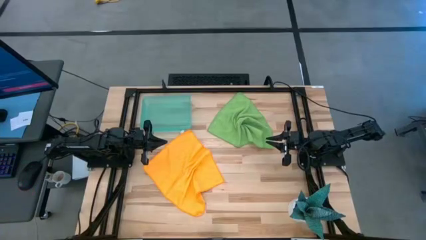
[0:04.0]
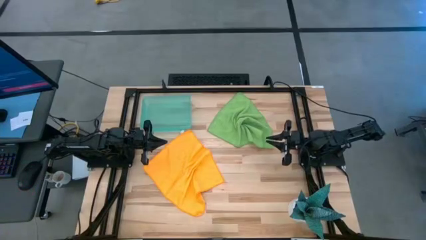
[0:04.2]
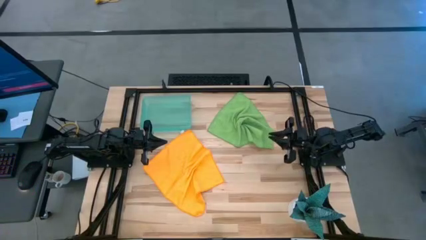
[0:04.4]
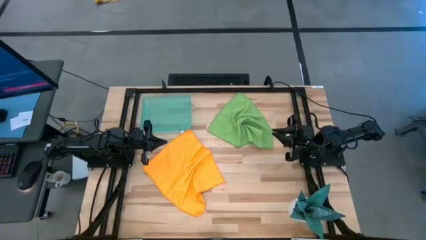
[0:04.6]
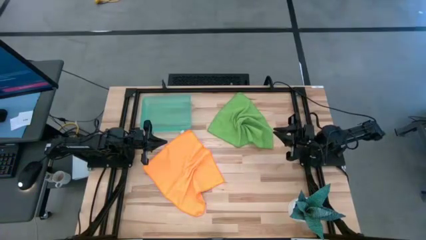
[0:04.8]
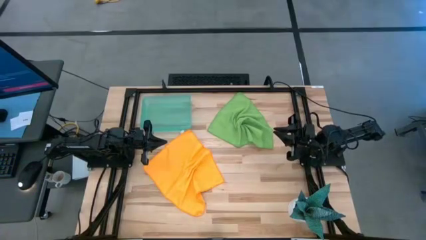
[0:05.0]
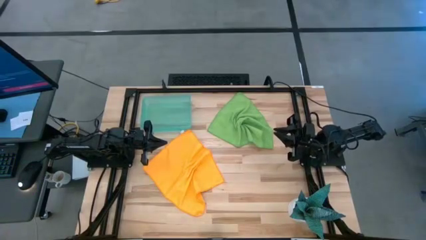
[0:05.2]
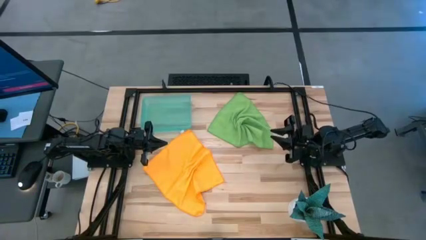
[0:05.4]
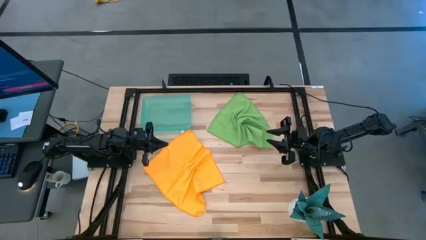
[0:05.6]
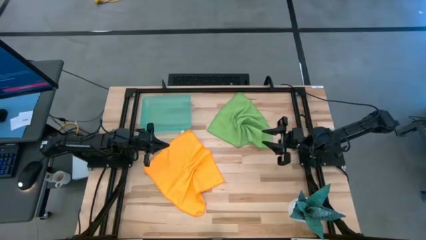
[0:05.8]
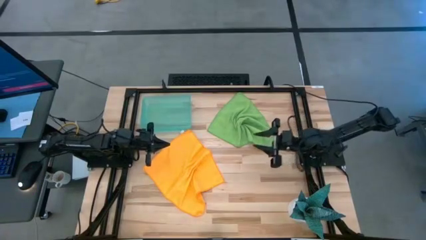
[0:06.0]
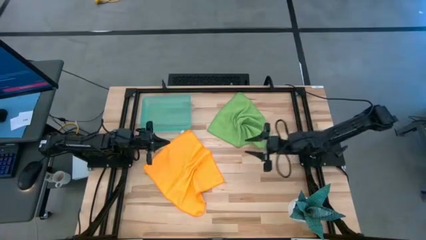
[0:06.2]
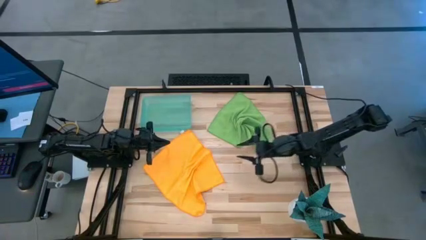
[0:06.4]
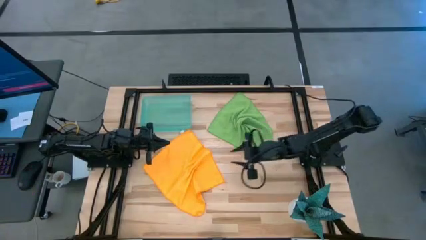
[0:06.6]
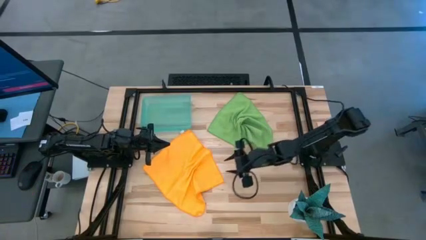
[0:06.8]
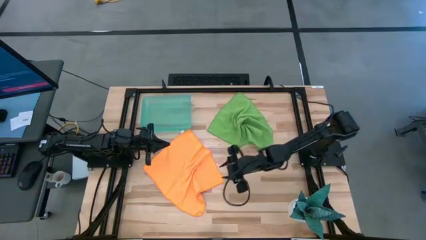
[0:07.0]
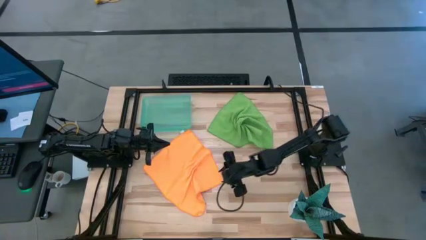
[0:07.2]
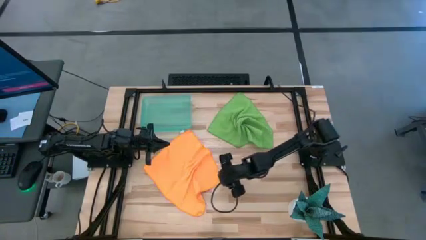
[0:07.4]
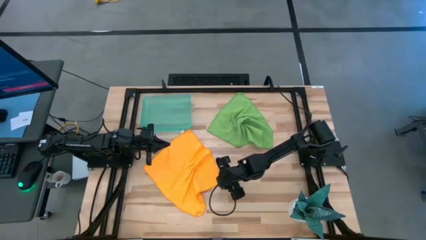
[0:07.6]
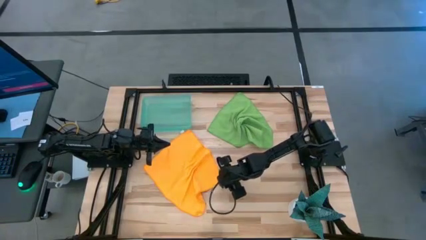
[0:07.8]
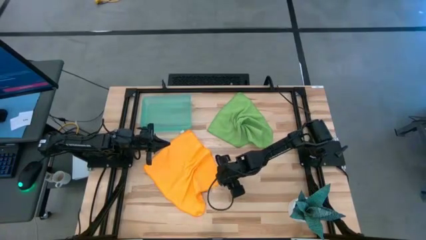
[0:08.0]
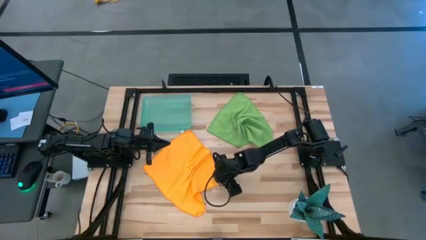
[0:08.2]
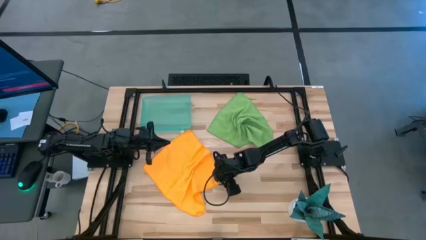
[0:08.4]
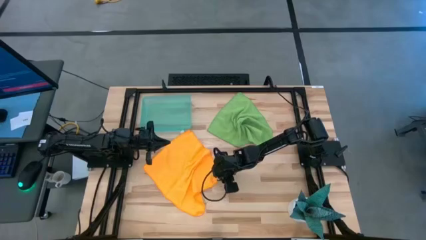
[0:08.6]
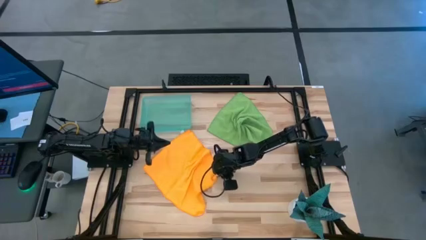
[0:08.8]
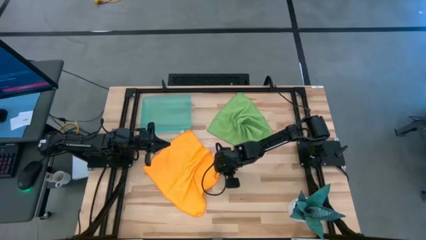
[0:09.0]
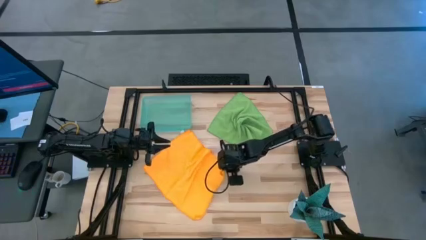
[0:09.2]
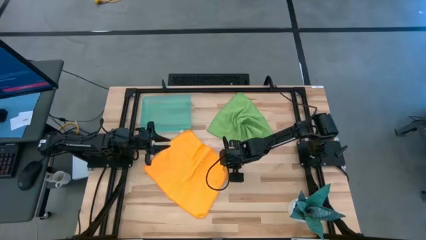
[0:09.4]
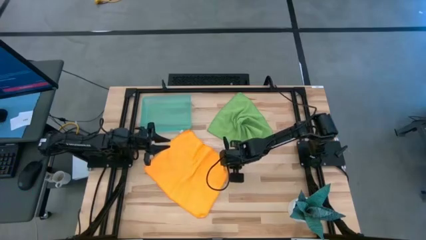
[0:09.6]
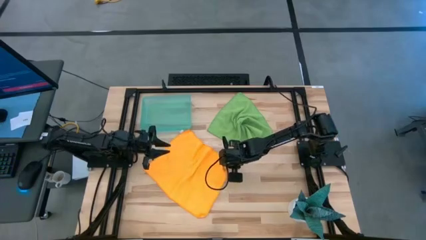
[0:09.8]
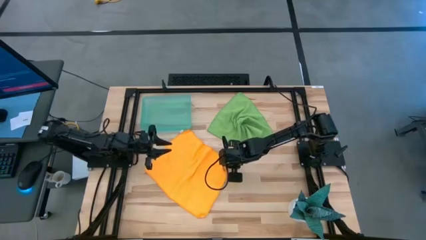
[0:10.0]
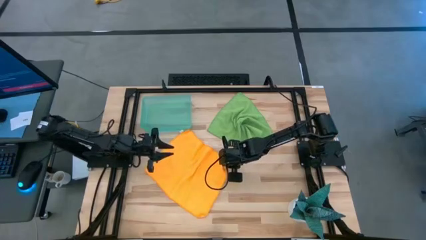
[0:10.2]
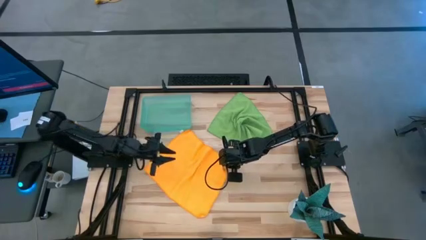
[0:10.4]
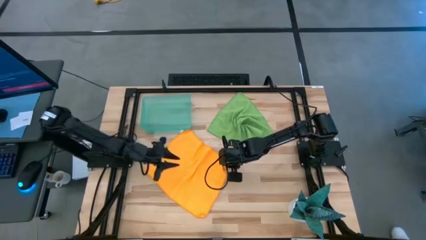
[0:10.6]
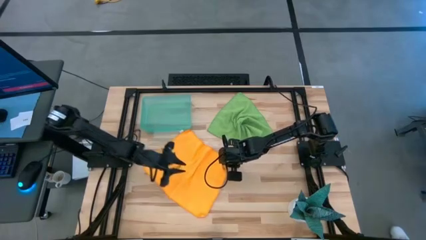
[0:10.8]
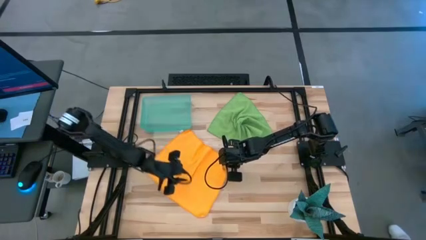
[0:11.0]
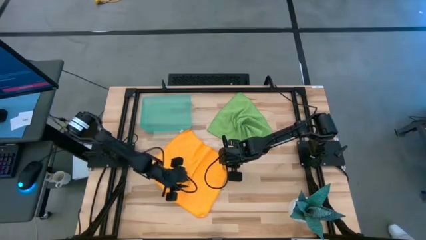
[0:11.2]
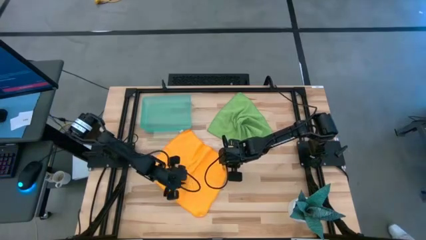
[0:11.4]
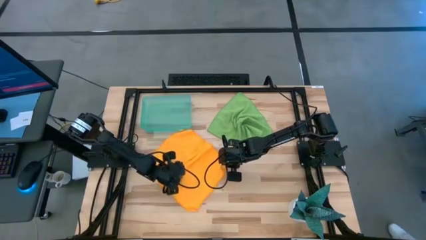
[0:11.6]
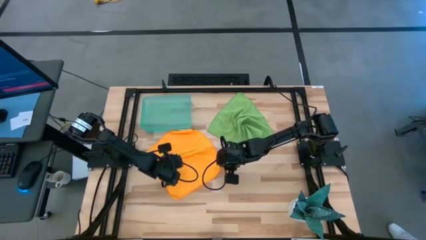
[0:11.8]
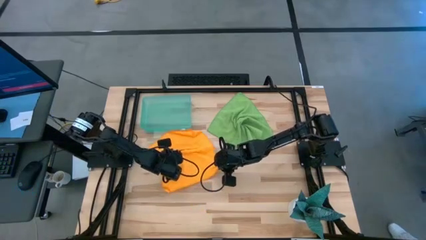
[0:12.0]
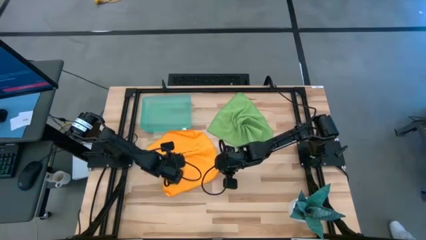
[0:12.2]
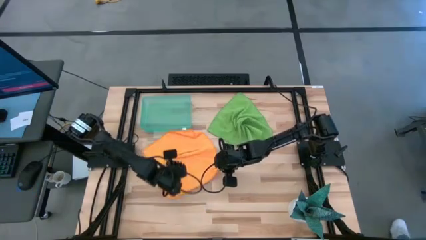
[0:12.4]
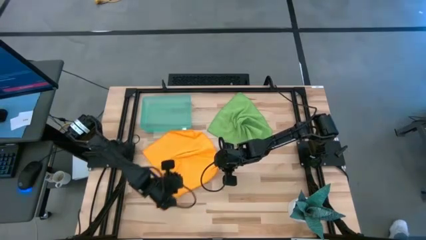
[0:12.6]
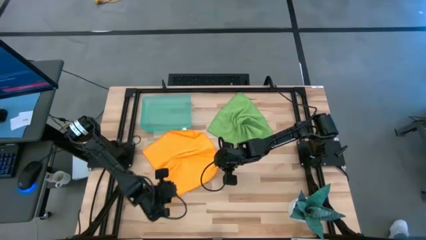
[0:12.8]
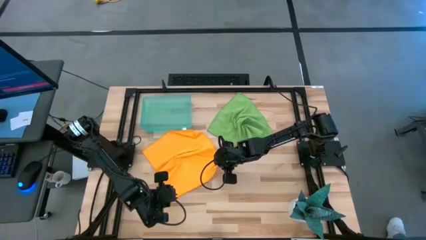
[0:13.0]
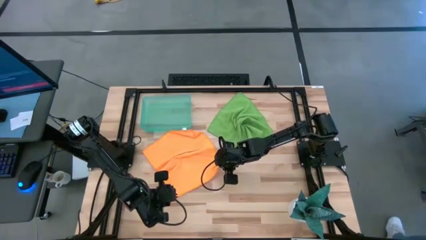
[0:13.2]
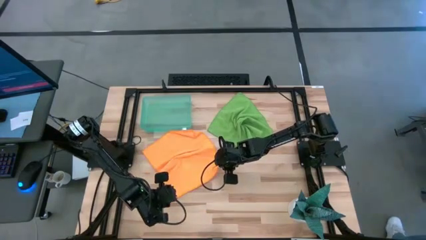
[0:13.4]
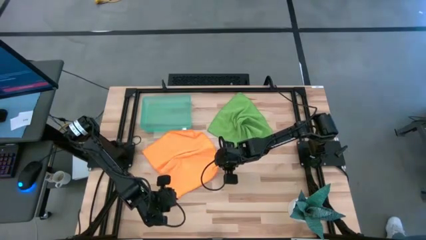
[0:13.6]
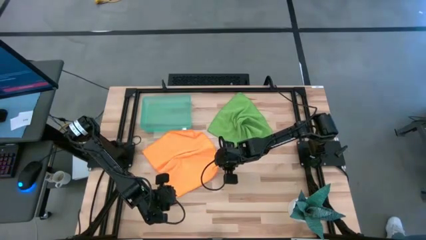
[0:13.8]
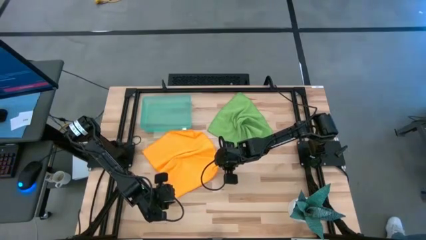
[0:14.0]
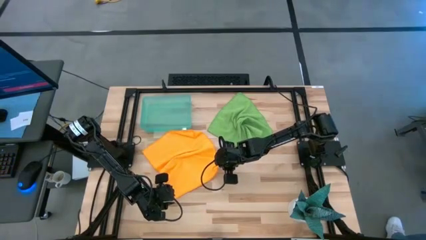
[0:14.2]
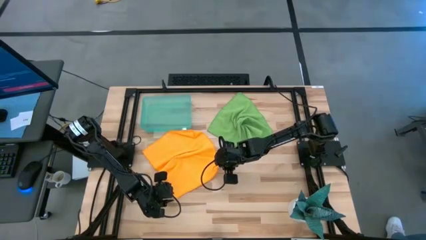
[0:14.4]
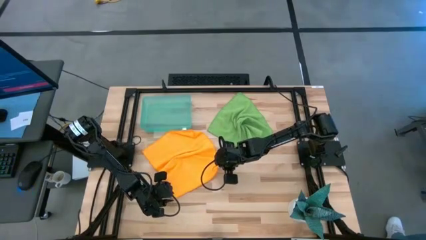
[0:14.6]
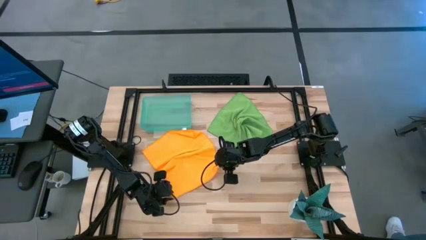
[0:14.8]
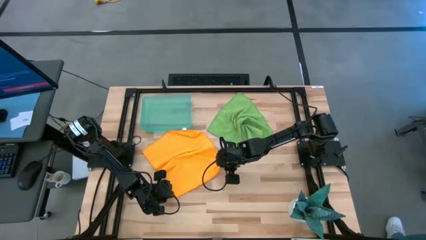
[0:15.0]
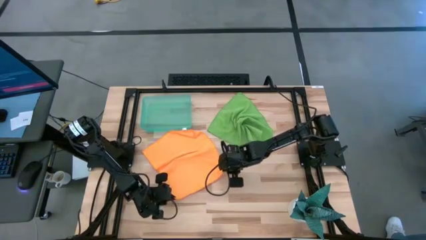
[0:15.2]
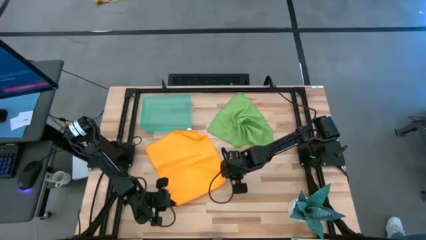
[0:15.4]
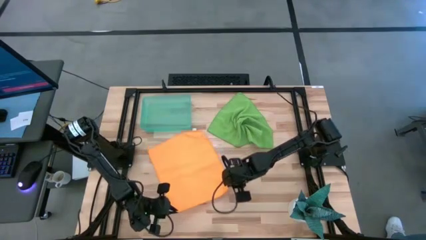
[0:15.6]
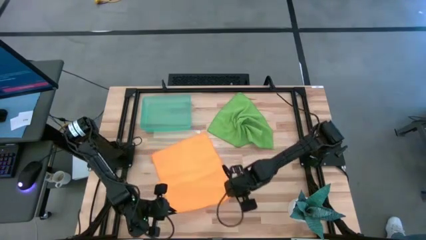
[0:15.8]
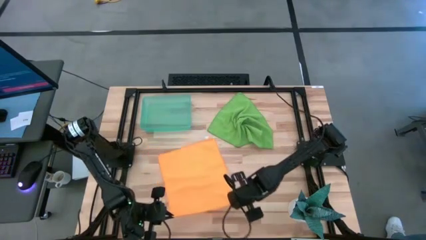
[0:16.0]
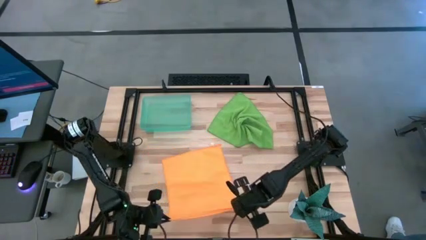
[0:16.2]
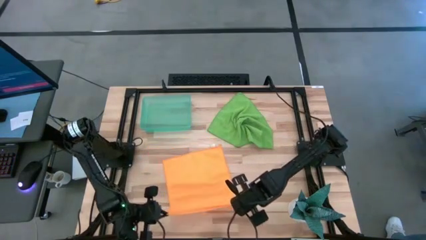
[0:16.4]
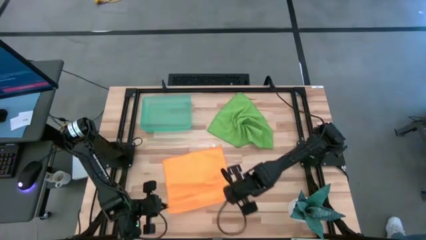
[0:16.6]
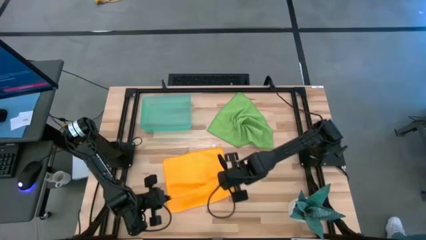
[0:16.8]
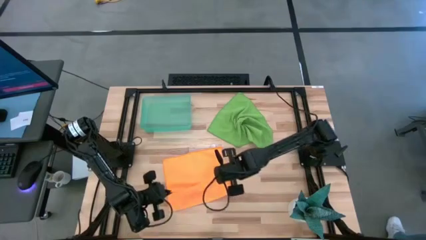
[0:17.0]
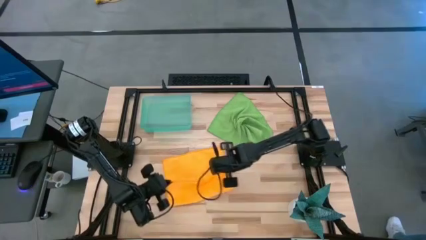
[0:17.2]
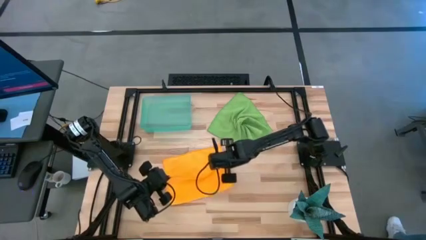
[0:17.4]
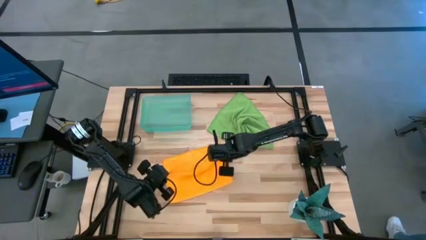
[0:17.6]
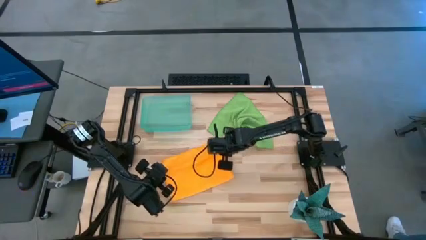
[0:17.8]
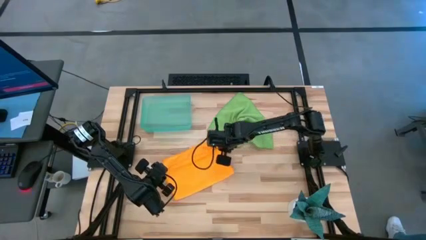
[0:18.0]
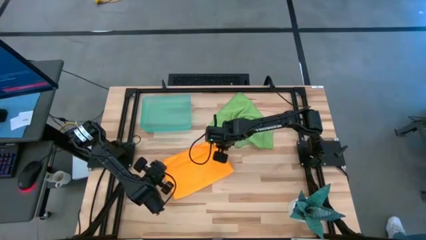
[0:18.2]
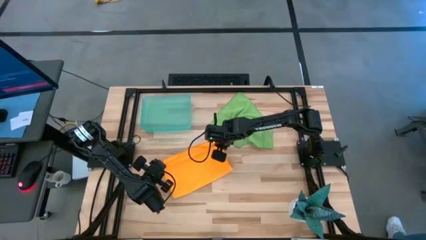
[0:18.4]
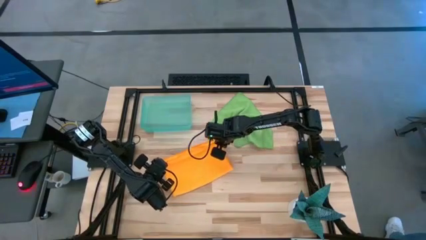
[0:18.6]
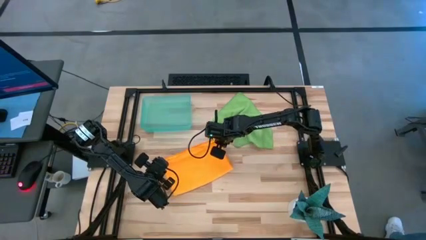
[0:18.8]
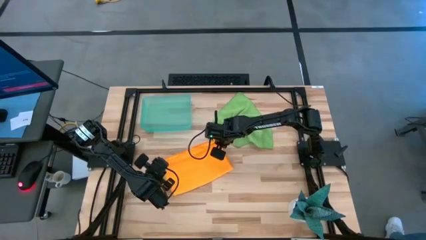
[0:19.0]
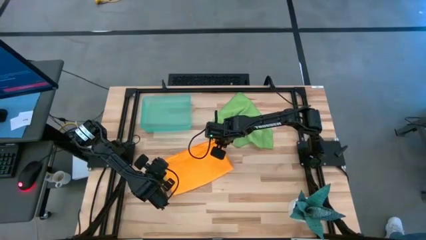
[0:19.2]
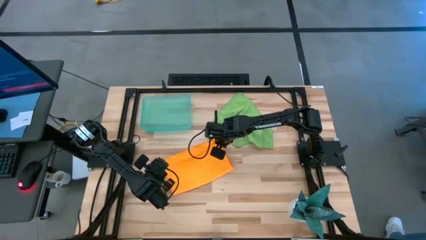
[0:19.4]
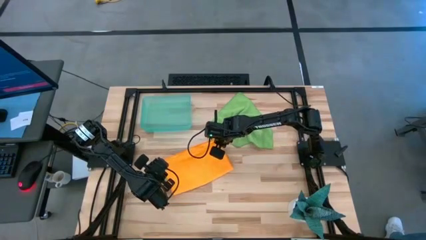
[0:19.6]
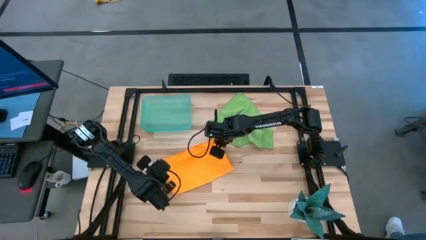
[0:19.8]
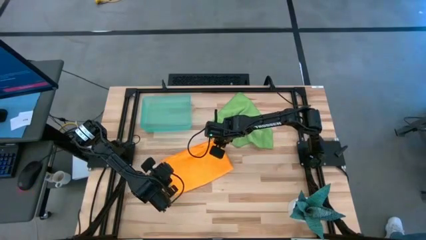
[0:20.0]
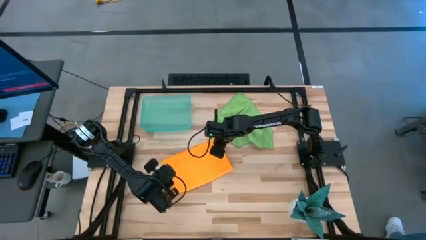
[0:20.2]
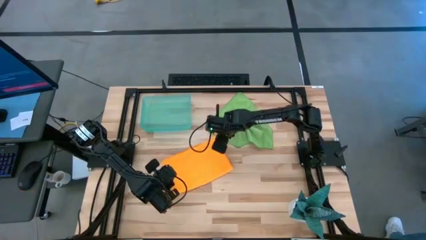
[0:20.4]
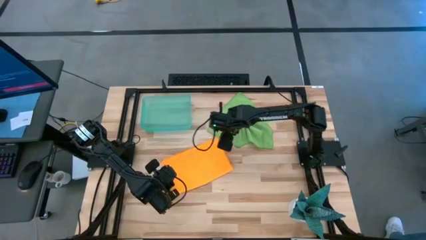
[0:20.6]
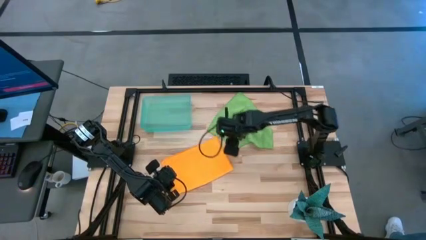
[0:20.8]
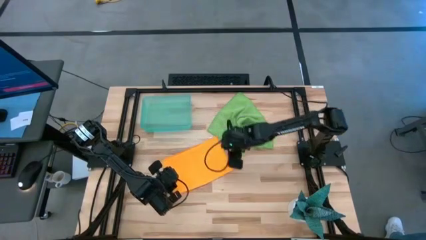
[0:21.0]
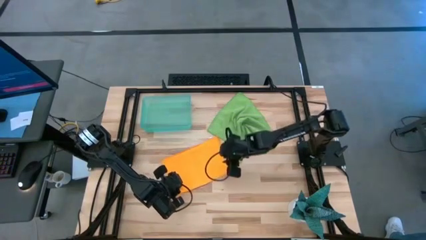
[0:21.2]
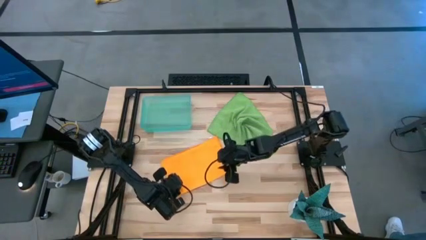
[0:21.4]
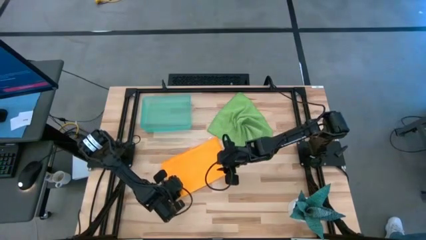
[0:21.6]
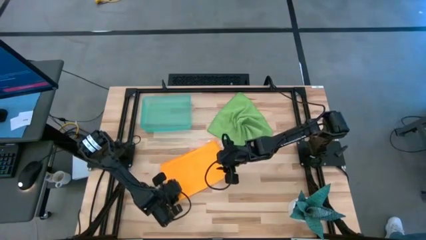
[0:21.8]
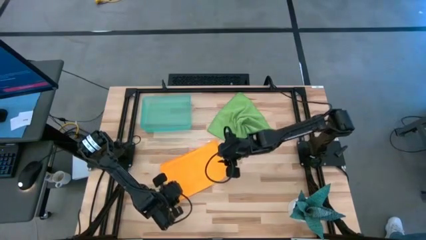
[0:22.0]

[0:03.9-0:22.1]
Task: Roll microfiber towels into tight, uniform cylinder then place into a basket
Fold the yellow towel
